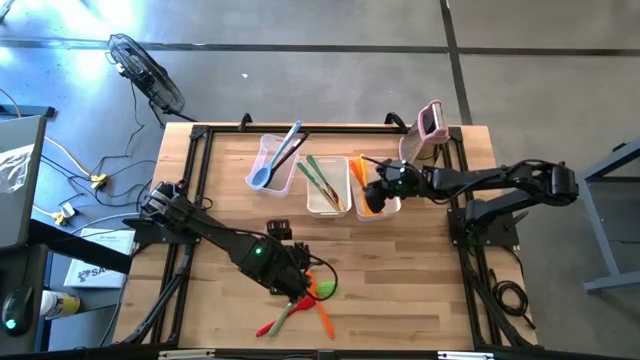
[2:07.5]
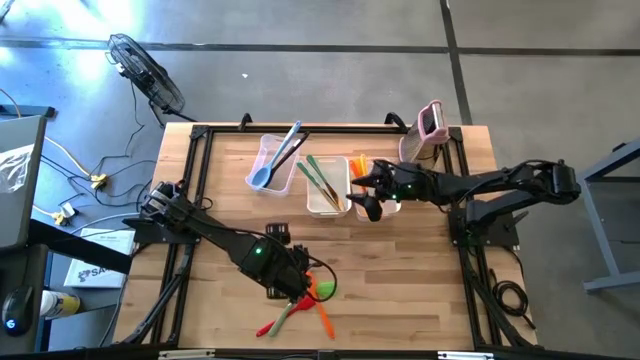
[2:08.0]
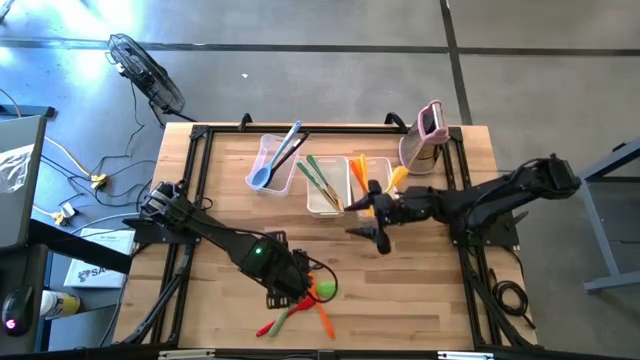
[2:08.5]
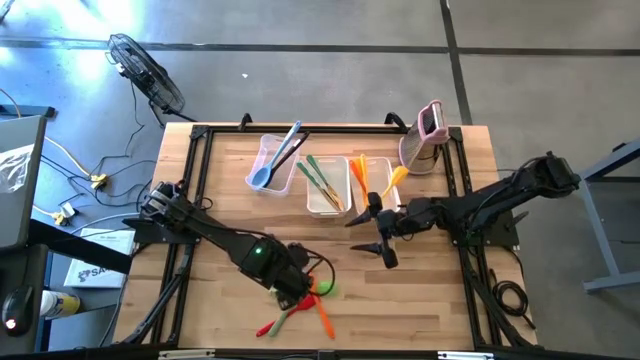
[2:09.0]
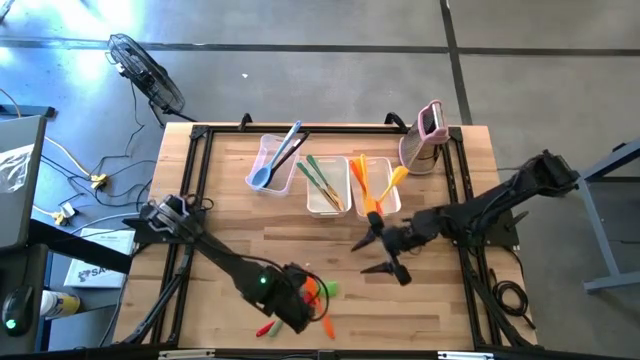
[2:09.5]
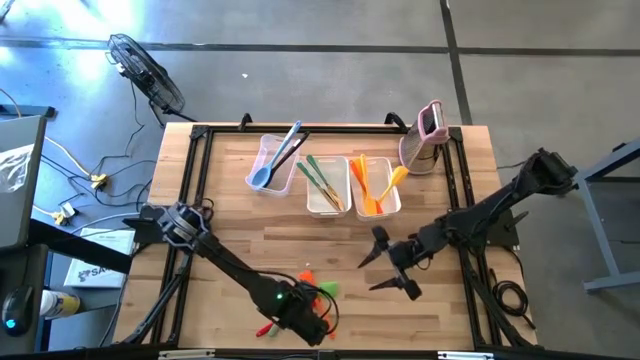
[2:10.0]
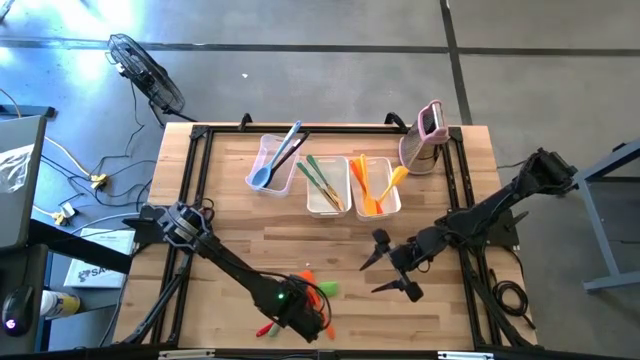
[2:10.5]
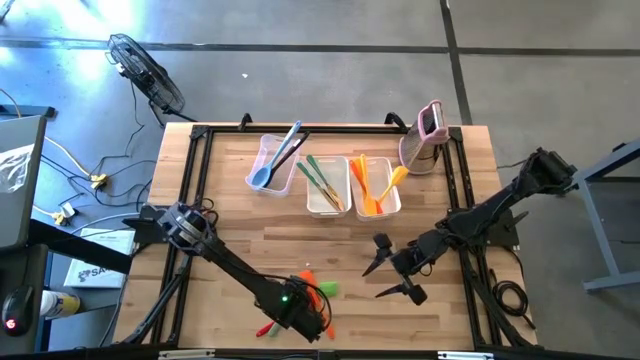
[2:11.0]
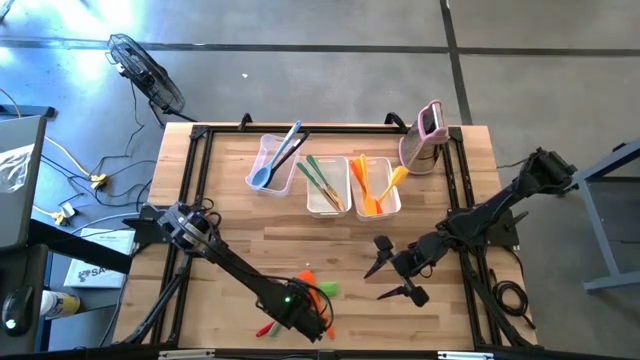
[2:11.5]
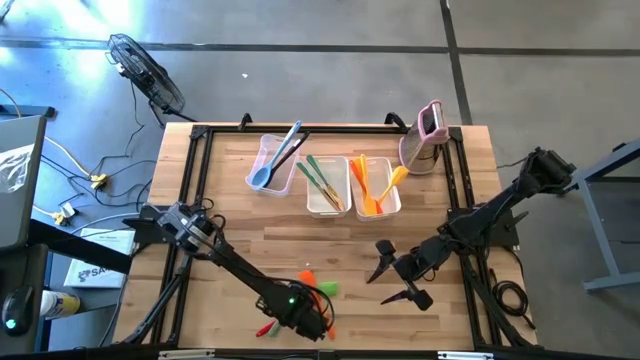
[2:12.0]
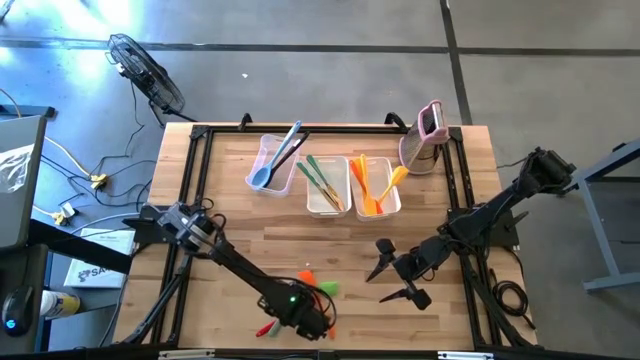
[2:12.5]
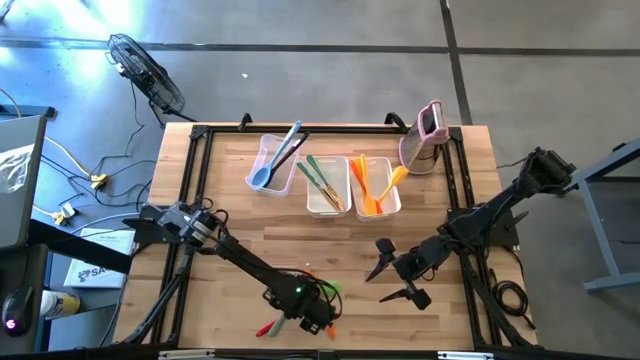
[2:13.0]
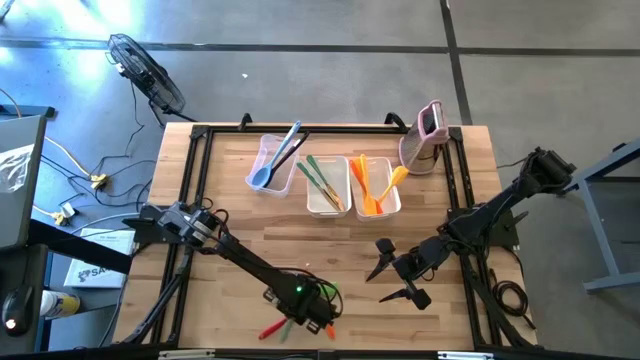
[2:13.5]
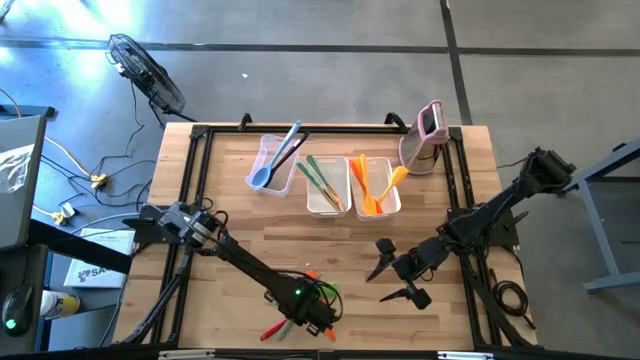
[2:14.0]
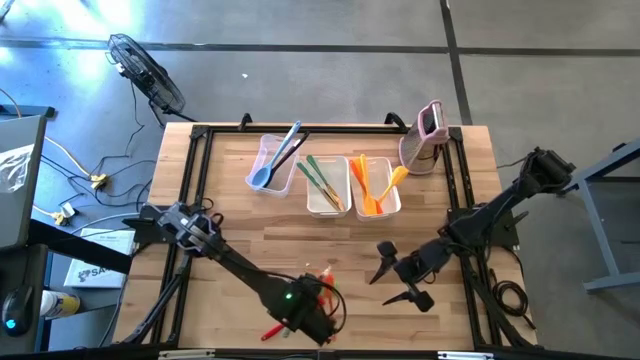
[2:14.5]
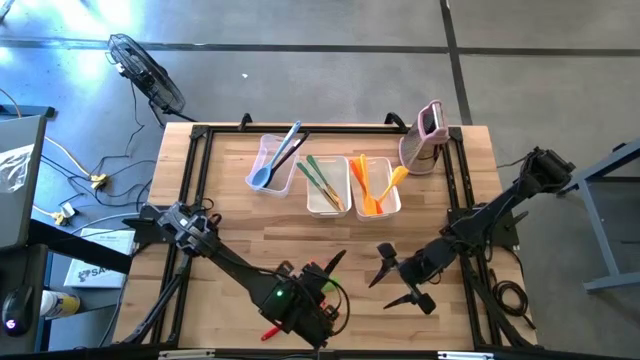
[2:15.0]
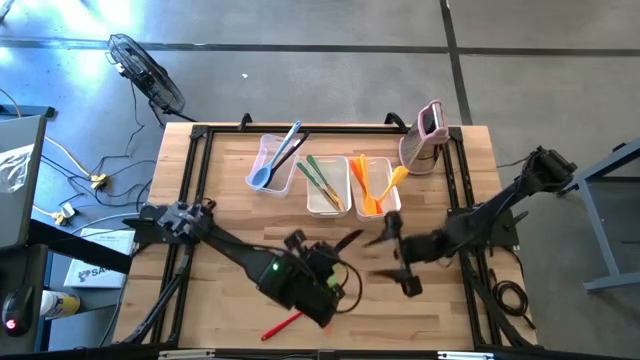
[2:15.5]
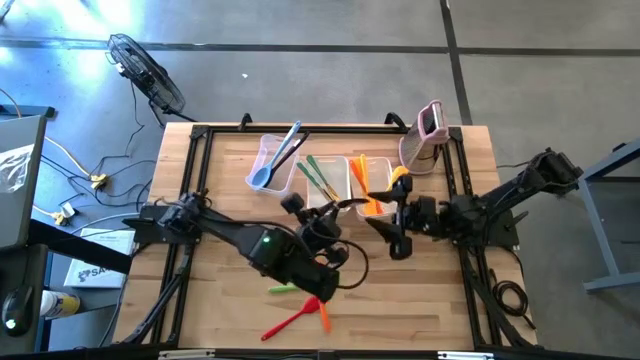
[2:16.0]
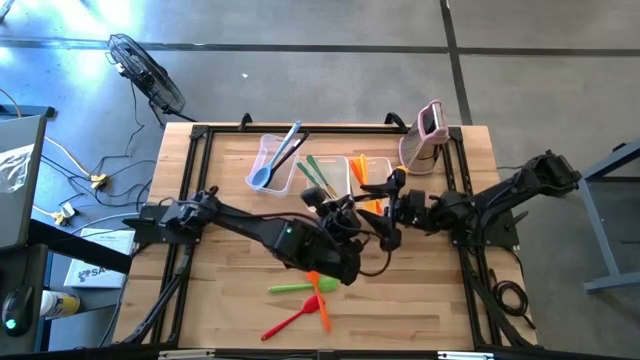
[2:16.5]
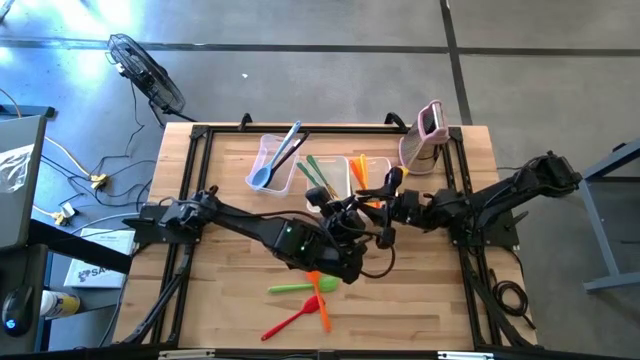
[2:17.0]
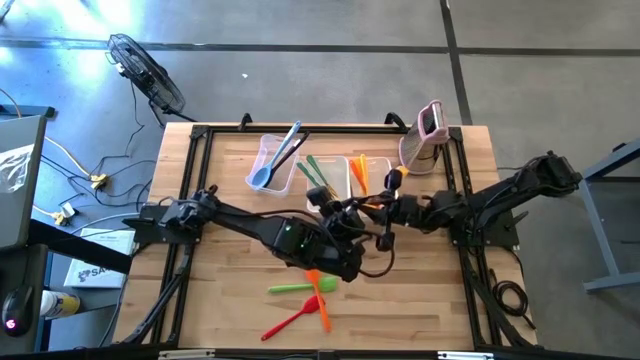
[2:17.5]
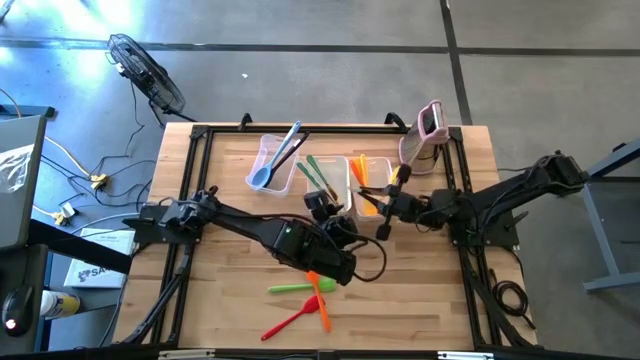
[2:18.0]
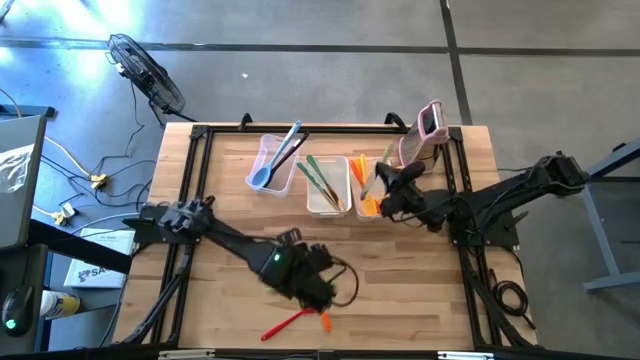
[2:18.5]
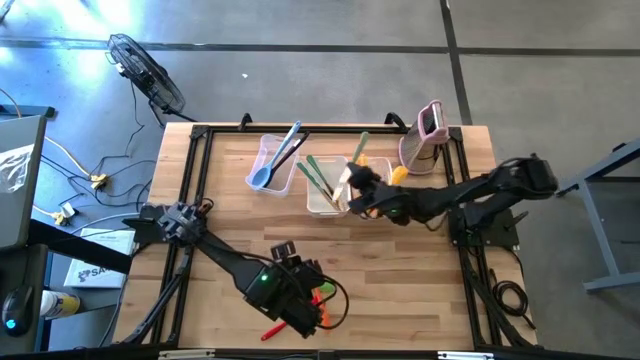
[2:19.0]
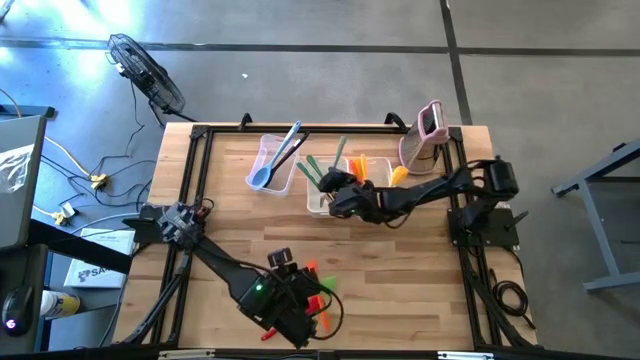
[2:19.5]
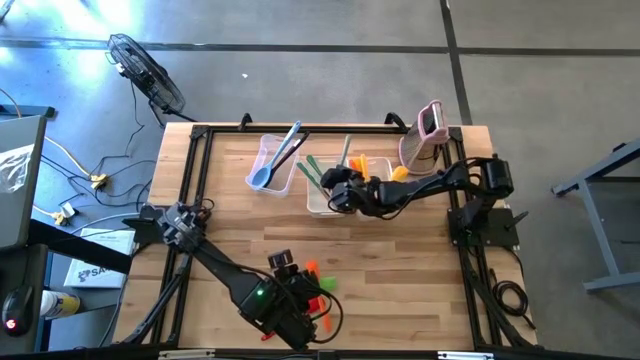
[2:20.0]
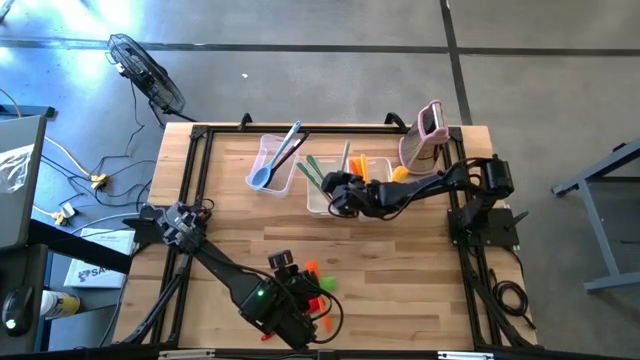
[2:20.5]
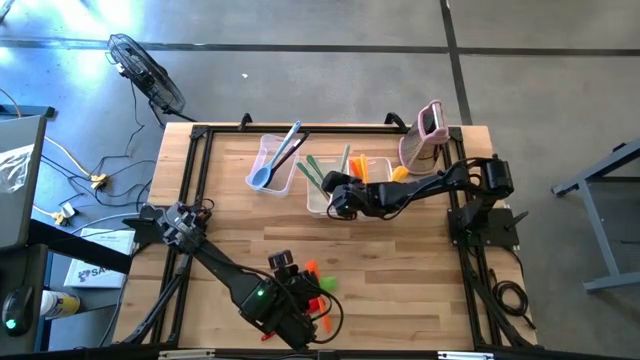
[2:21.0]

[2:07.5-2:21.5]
Task: Pick & Place Kitchen Items
Put the light green knife into the left white bin

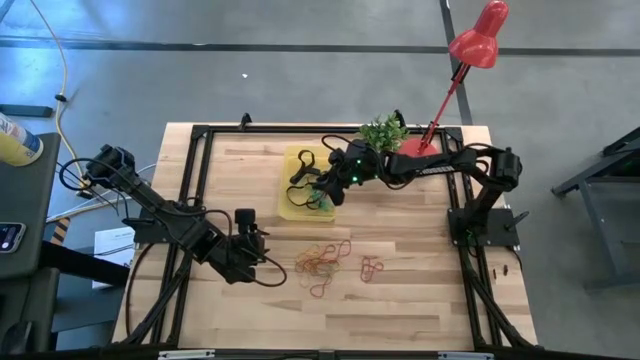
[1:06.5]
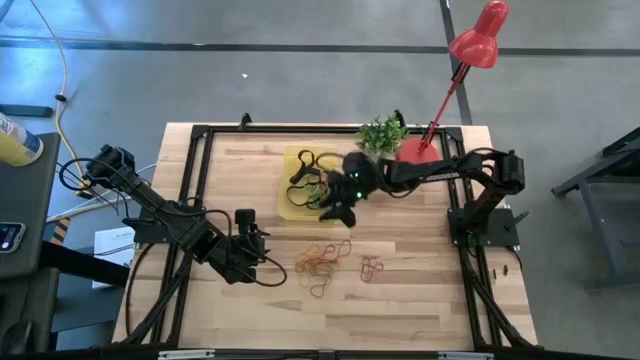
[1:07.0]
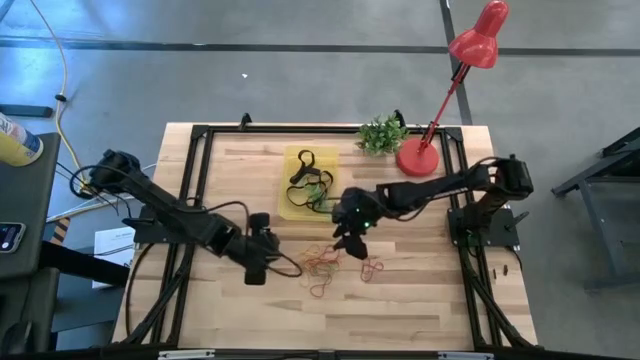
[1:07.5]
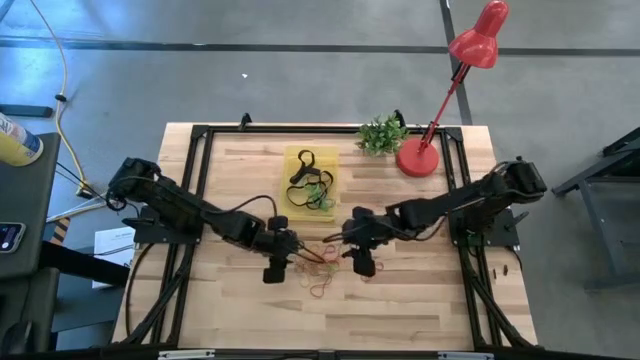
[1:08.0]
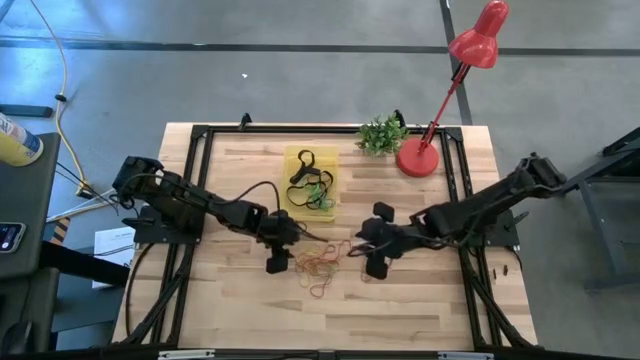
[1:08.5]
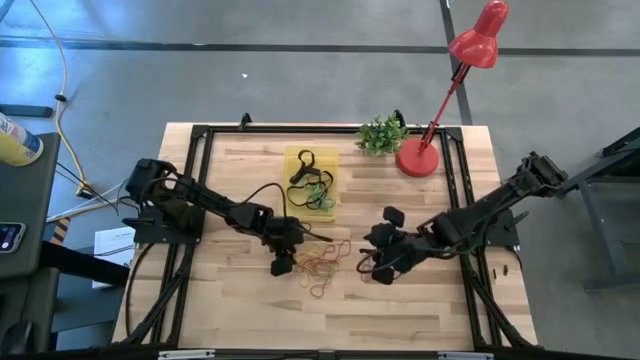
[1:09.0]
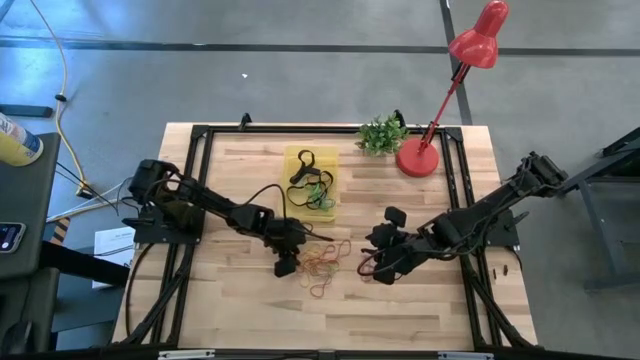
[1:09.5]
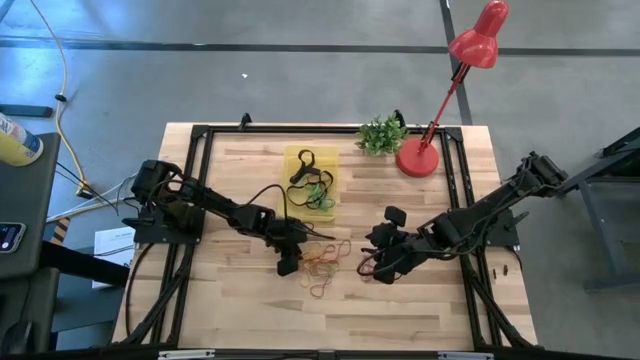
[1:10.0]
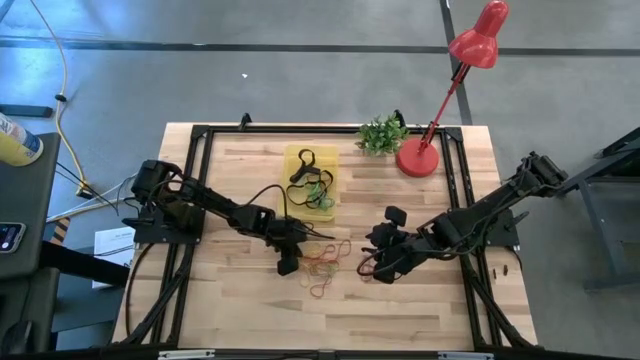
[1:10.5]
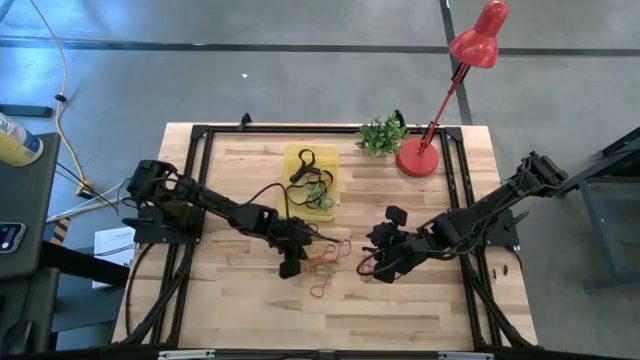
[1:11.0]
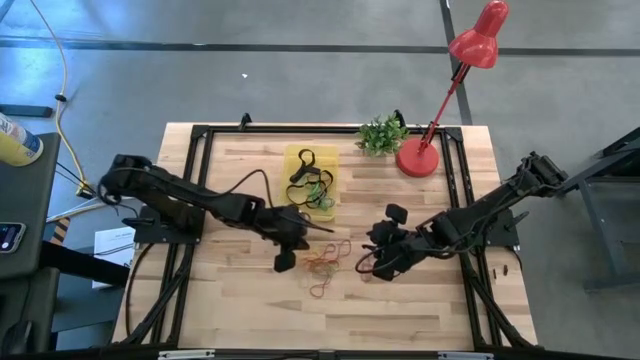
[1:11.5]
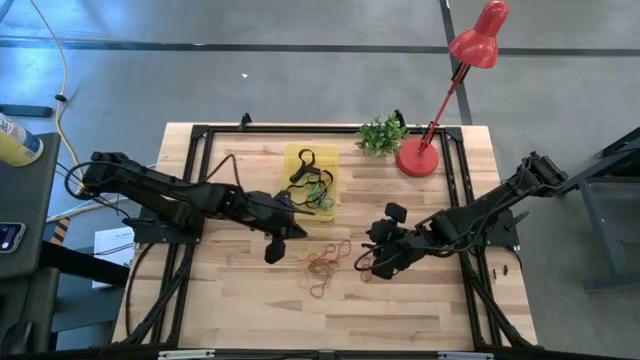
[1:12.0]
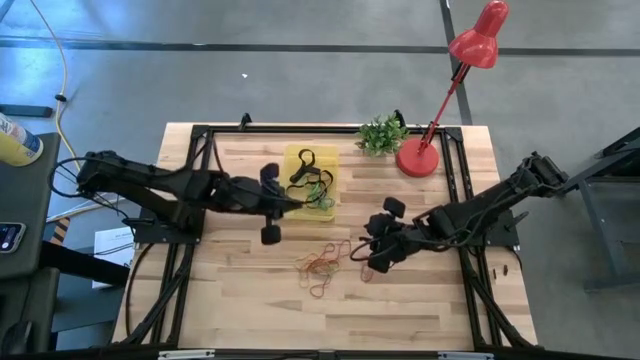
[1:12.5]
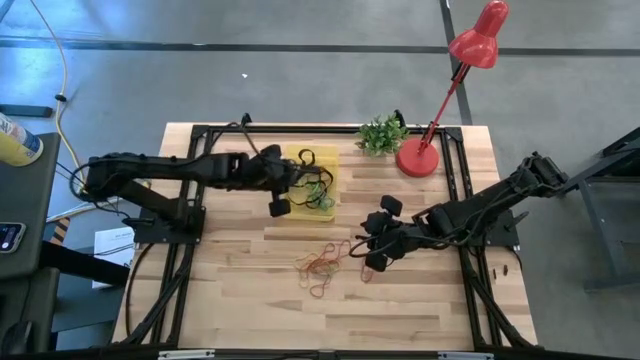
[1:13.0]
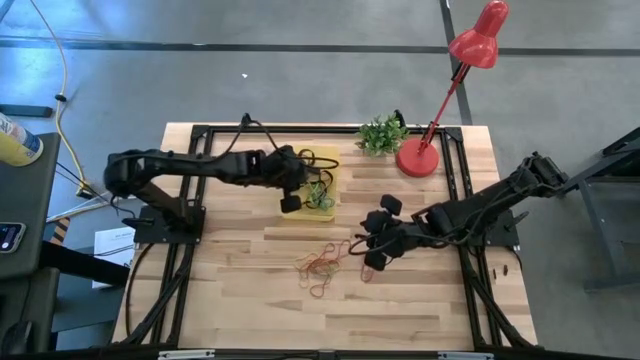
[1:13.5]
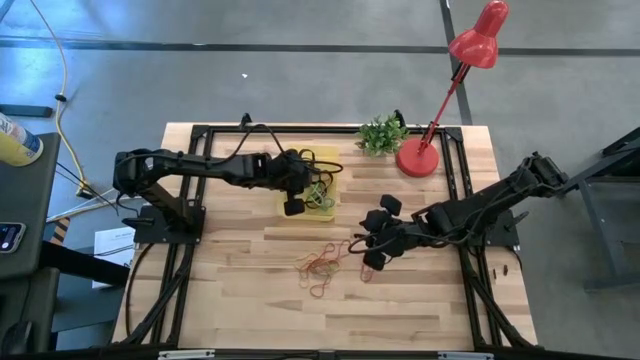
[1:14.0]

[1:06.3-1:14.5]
Task: Pick and place rubber bands into bin
Put the yellow rubber band into the yellow bin
